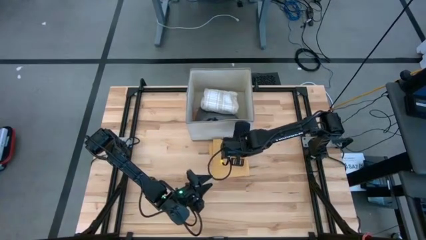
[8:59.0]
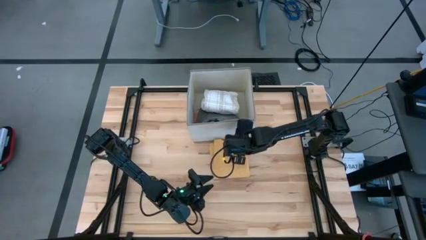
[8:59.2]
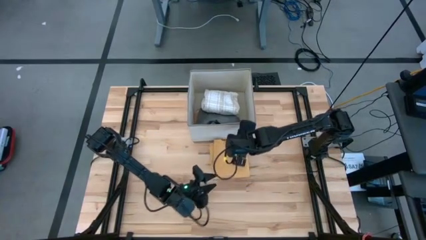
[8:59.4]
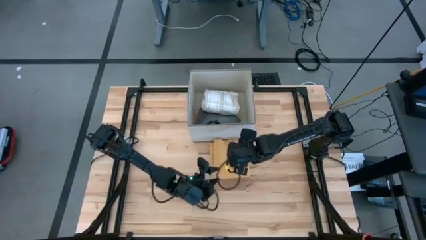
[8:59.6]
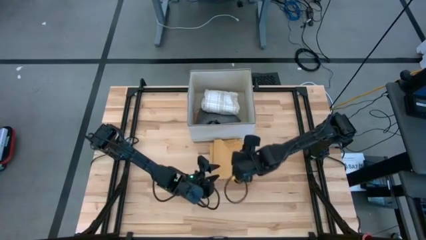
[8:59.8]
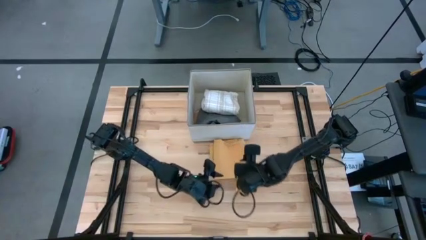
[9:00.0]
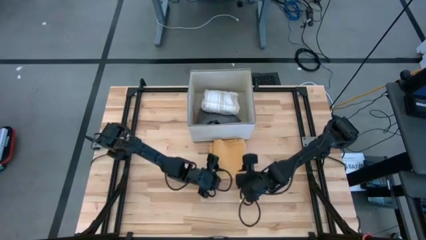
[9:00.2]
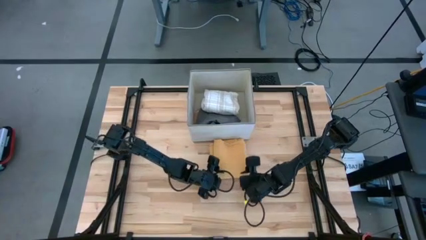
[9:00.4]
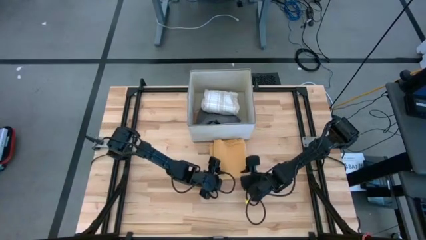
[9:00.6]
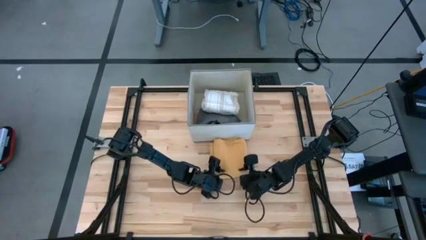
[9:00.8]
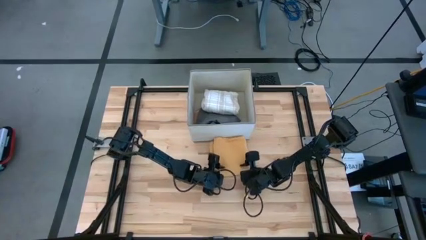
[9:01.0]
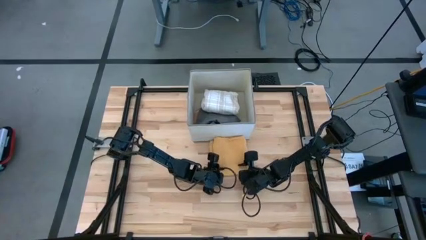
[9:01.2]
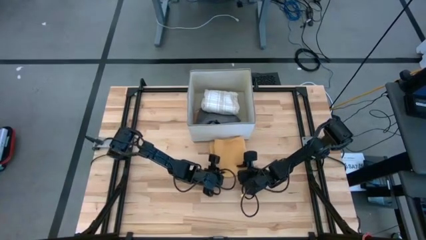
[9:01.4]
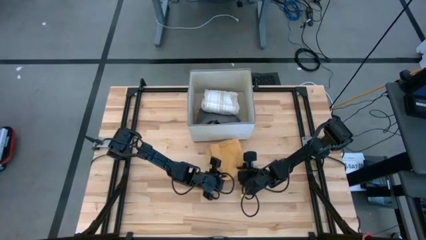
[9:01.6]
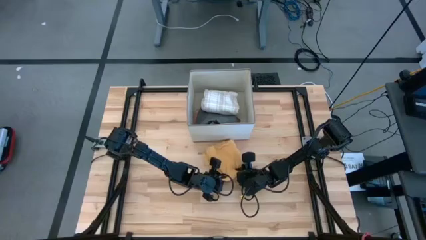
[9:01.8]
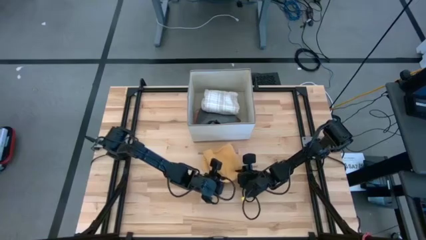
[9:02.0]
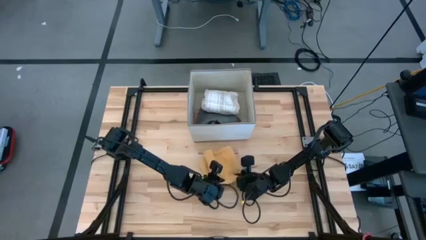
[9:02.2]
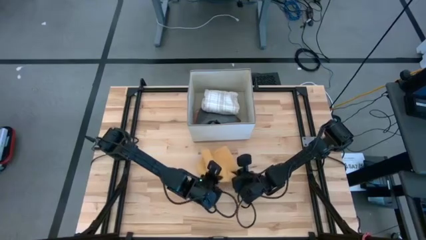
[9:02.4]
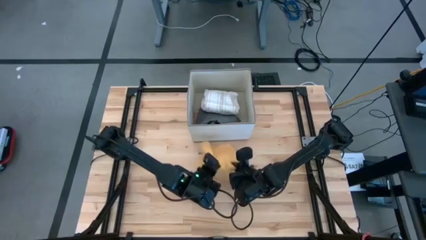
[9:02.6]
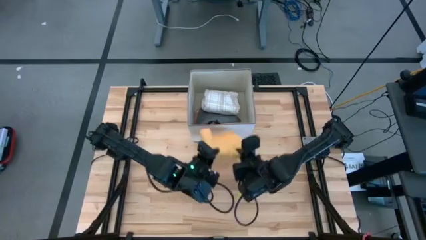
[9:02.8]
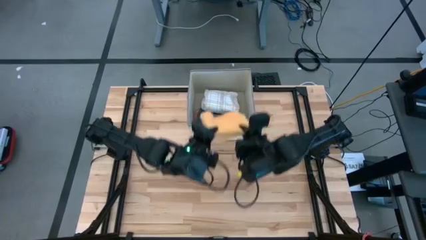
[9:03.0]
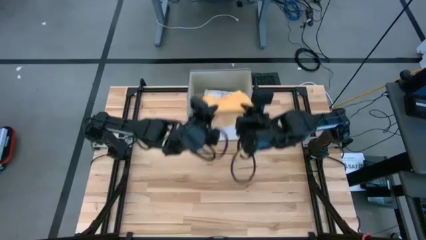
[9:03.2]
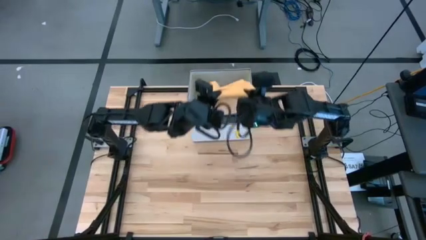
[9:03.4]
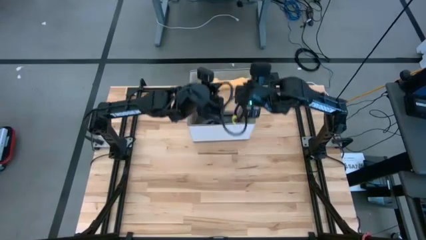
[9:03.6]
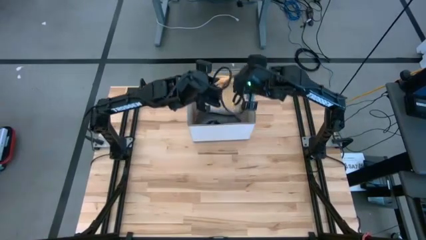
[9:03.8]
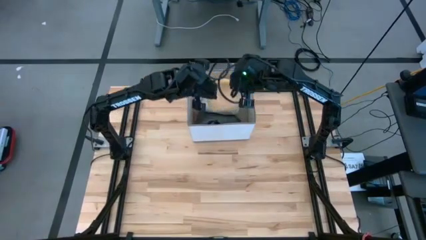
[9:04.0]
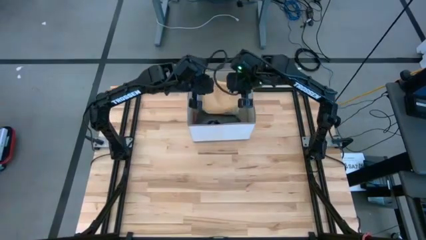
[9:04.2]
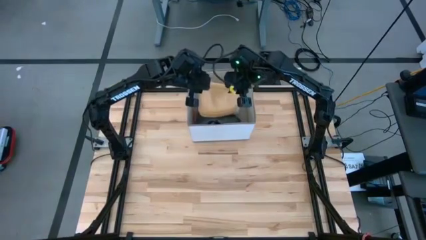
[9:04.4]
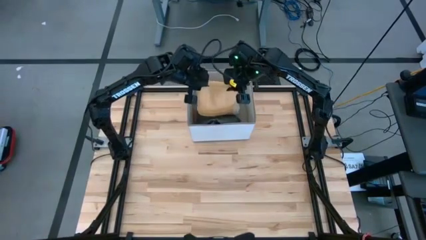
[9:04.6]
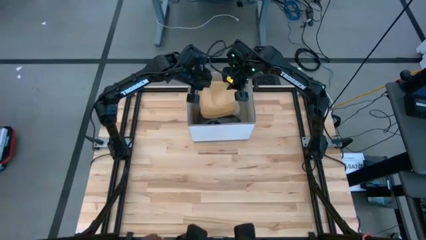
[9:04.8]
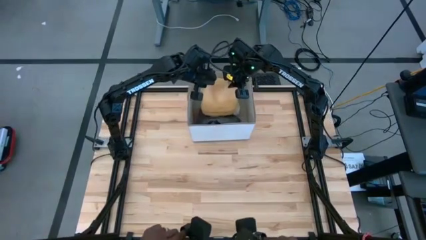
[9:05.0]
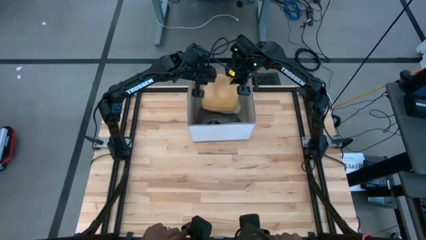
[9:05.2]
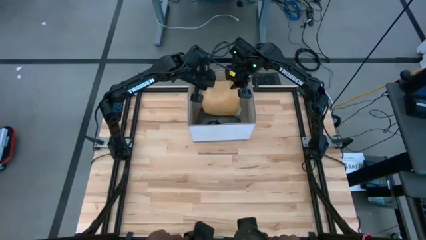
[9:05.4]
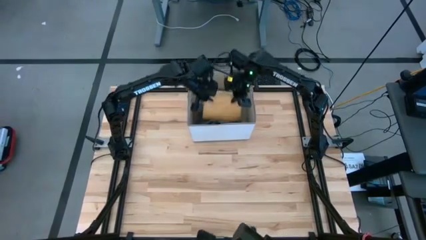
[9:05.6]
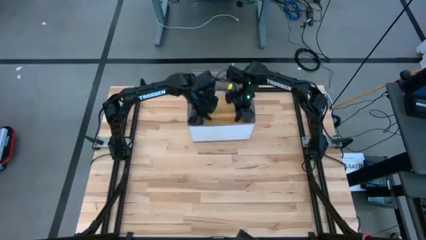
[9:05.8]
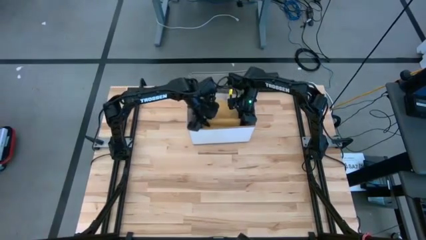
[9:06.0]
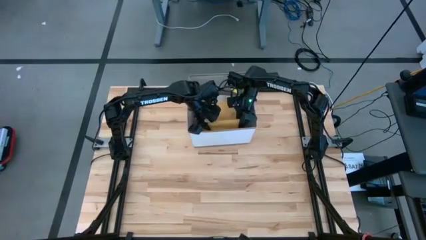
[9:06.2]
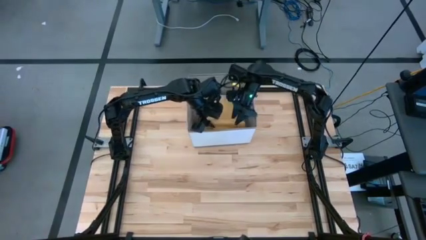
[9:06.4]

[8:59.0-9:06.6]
Task: Fold towel
Put the folded orange towel into the laundry organizer

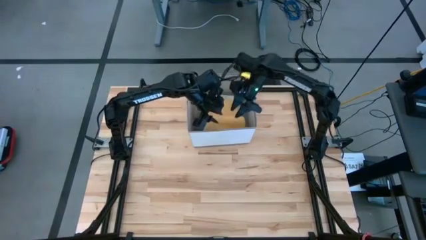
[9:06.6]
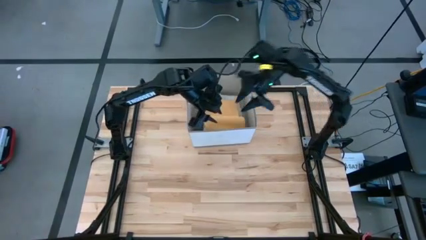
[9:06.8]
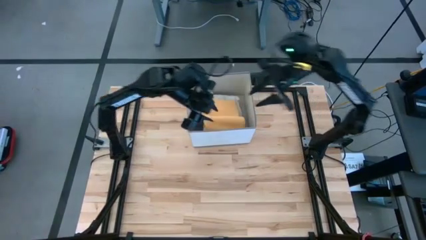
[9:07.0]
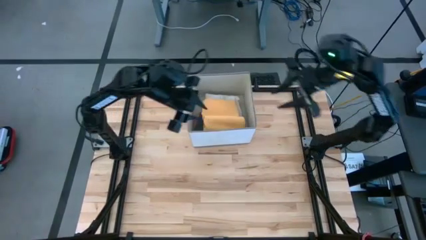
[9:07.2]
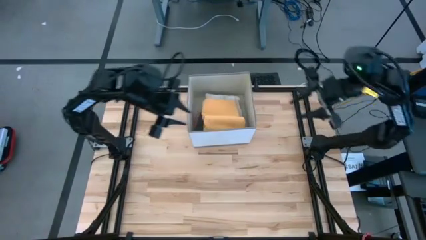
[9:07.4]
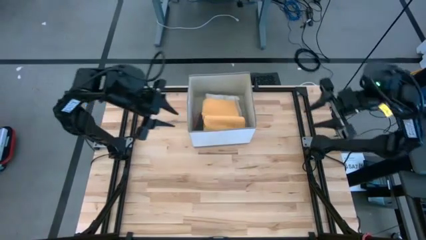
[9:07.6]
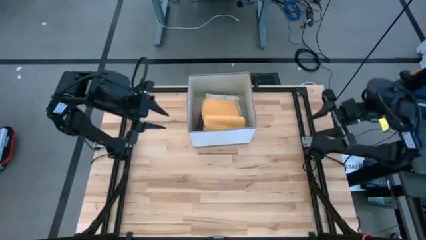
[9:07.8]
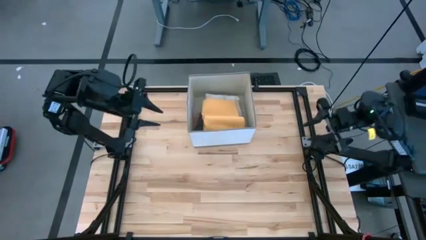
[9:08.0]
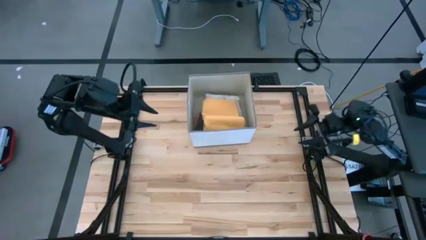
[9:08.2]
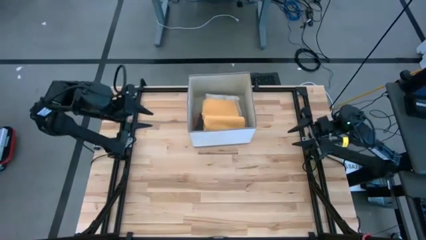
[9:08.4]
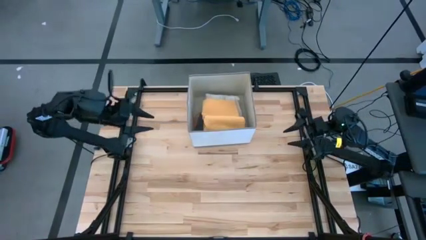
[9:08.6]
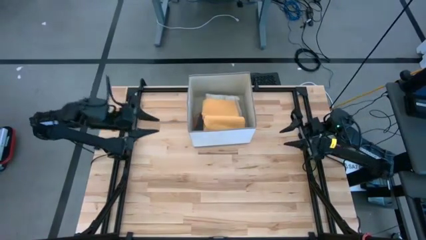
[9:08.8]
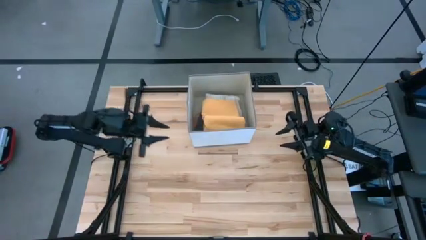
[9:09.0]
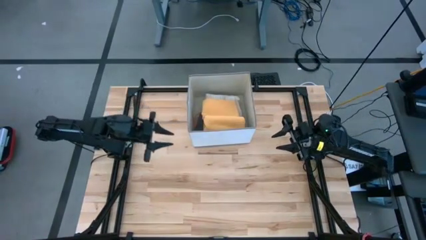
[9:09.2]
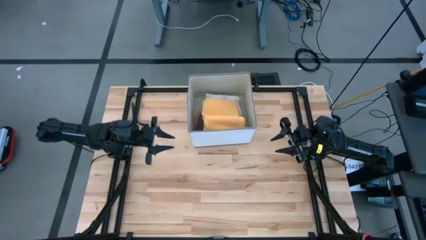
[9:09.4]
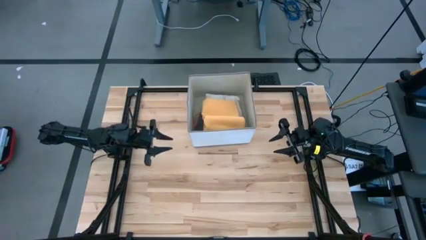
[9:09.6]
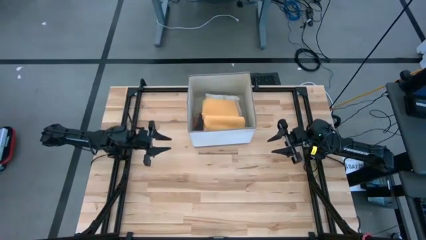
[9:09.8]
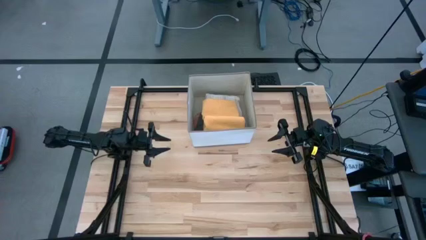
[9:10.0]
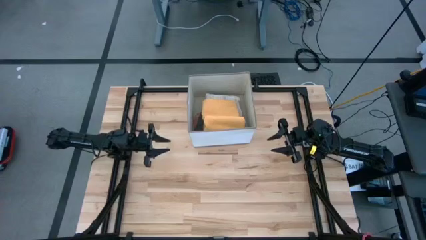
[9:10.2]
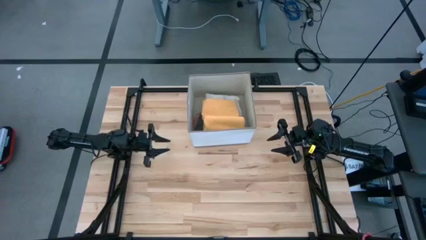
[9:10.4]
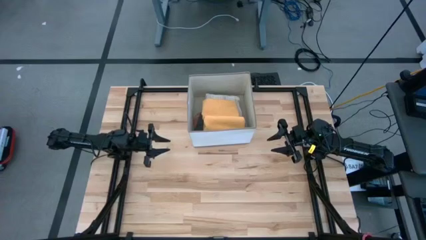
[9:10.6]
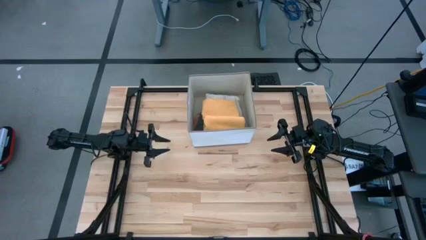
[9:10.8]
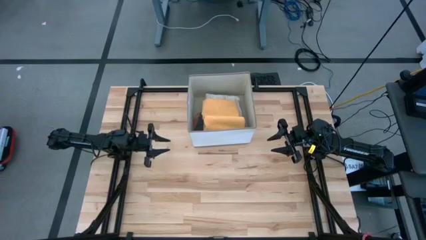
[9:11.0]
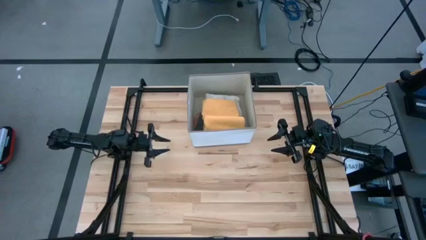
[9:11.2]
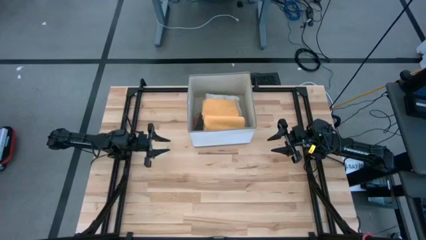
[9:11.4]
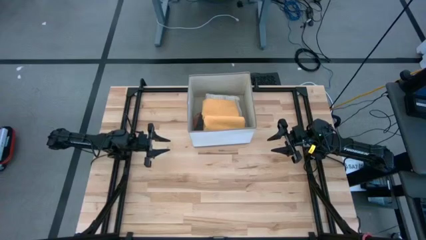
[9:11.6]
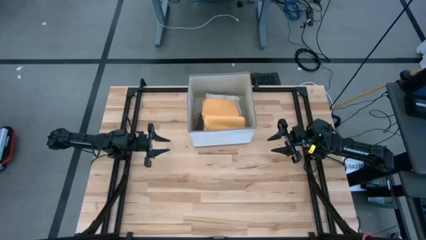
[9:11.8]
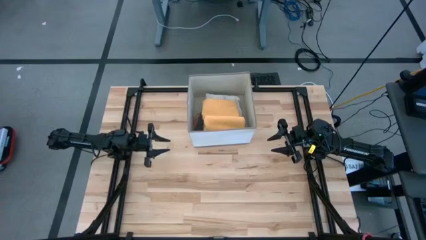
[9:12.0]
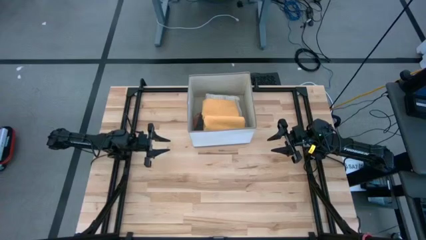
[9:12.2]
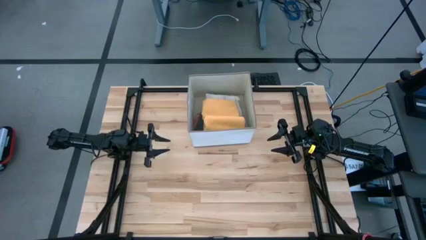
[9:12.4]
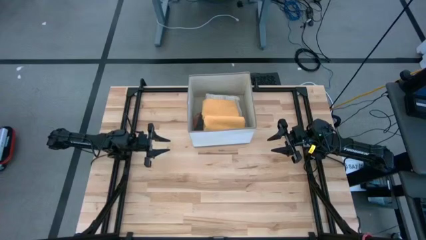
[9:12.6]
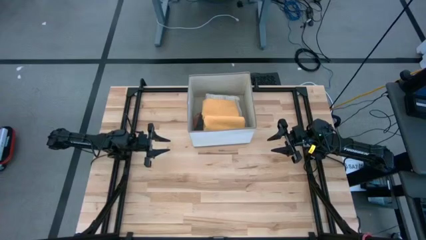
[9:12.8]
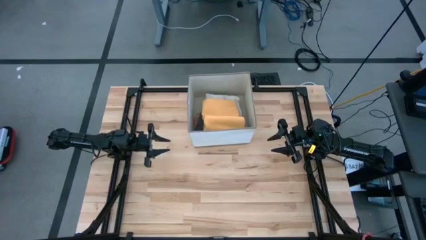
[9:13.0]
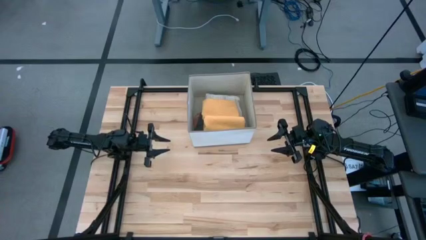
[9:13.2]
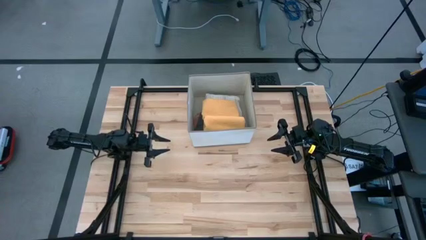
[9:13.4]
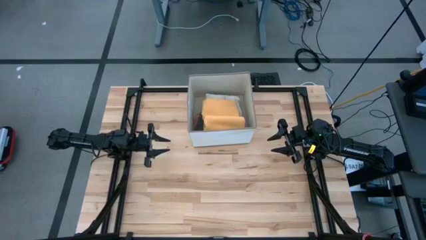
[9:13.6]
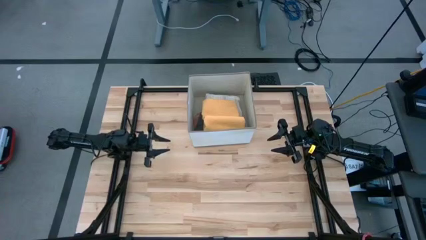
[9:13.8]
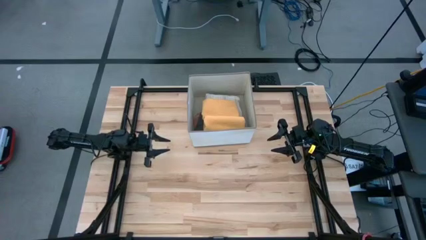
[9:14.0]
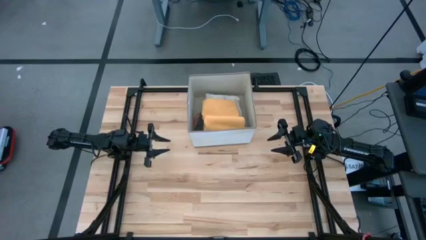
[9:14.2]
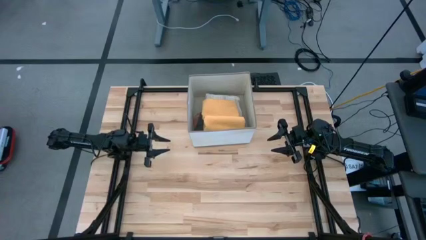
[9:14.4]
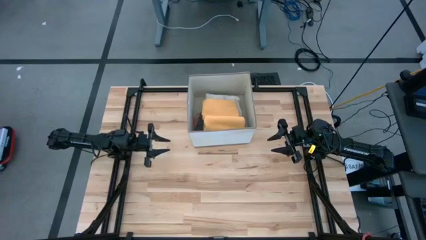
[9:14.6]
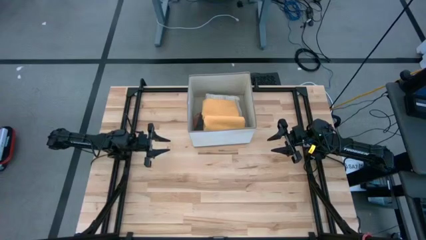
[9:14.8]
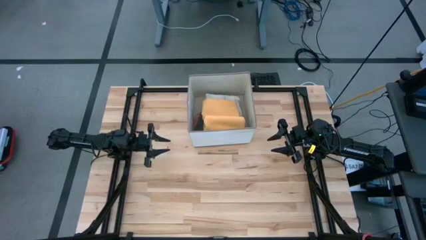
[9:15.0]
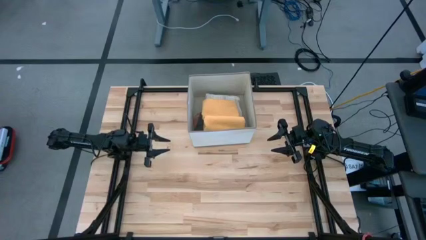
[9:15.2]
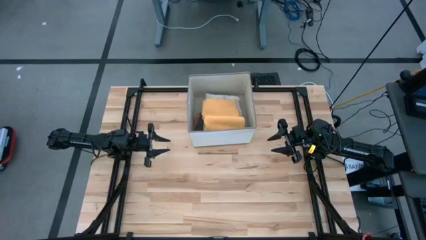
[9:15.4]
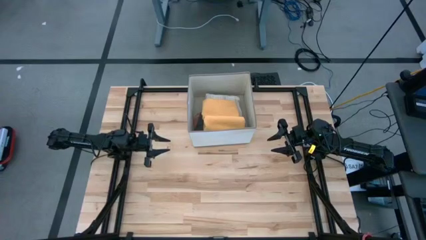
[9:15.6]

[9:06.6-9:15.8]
Return to Home Position
